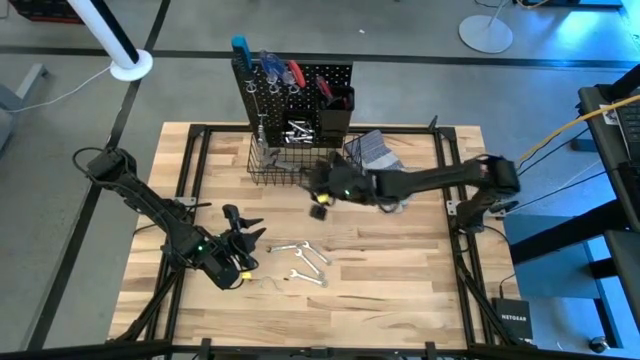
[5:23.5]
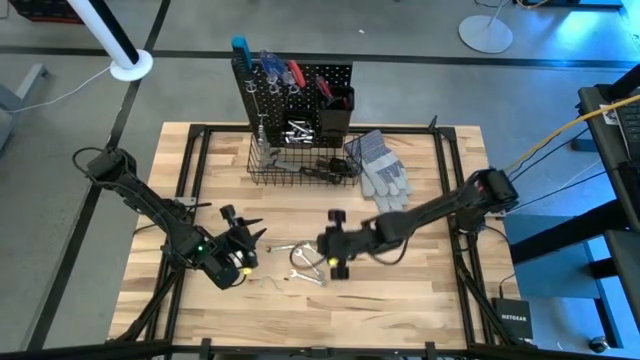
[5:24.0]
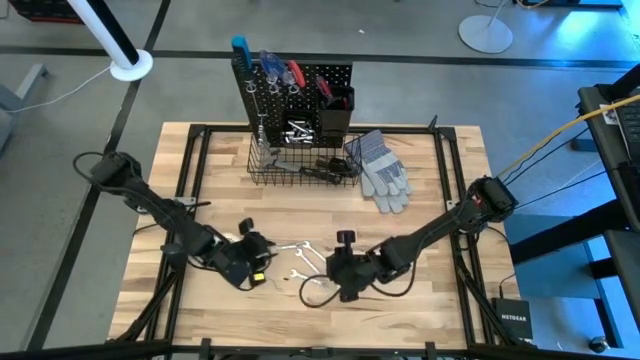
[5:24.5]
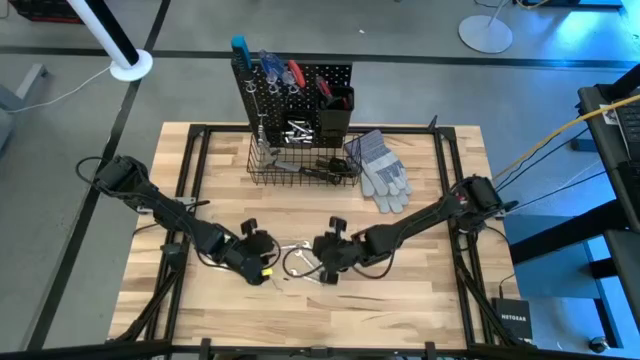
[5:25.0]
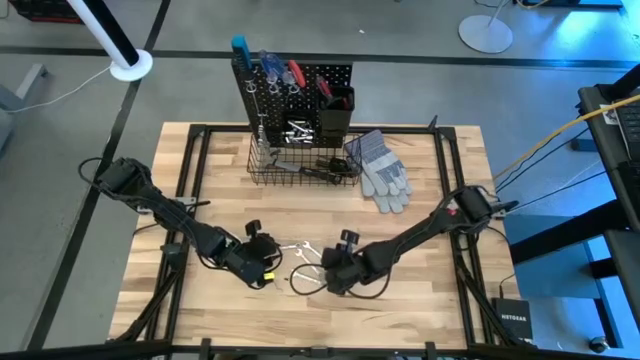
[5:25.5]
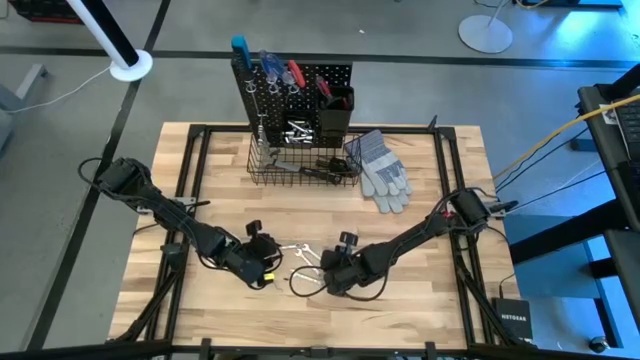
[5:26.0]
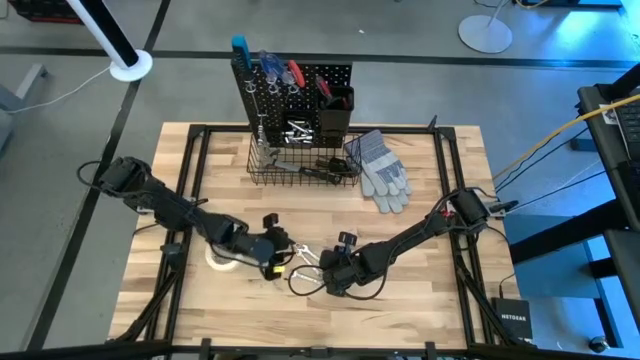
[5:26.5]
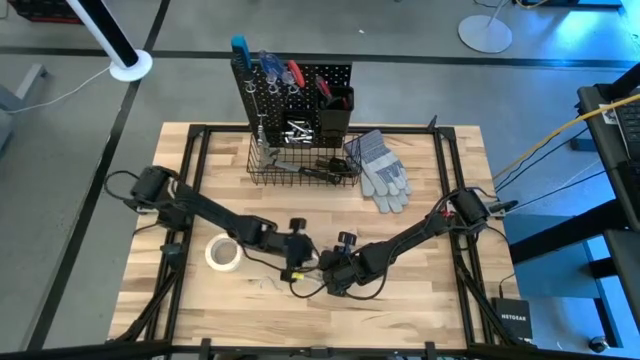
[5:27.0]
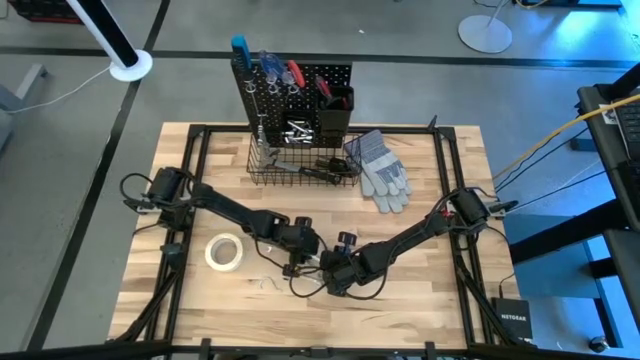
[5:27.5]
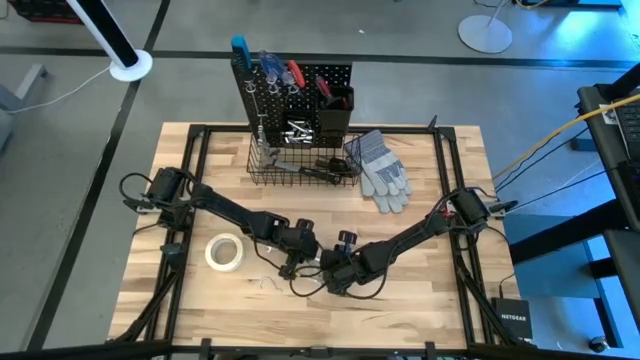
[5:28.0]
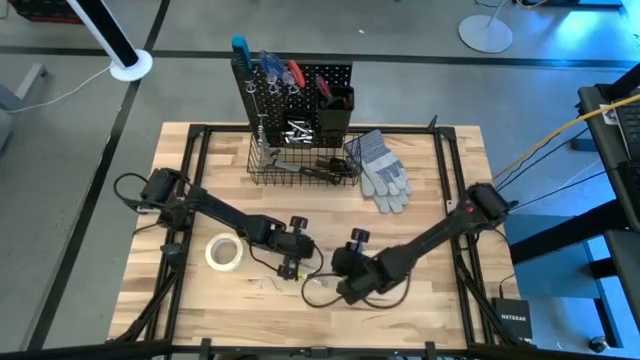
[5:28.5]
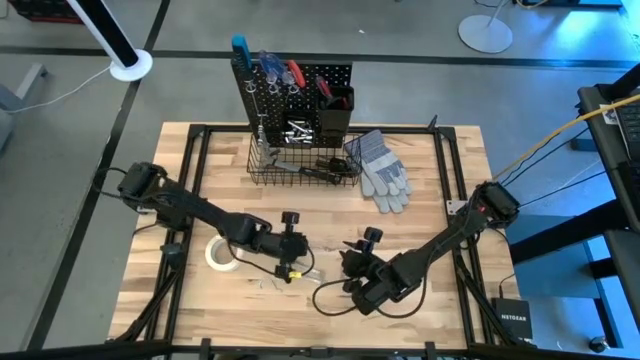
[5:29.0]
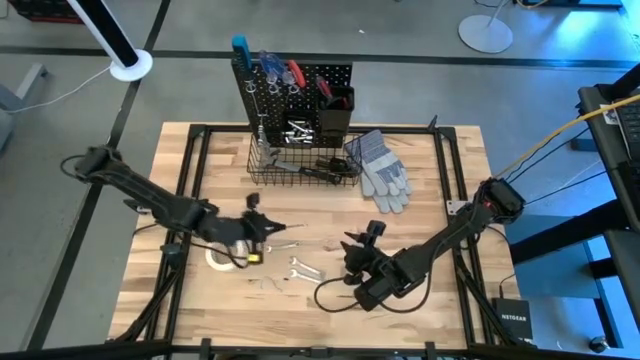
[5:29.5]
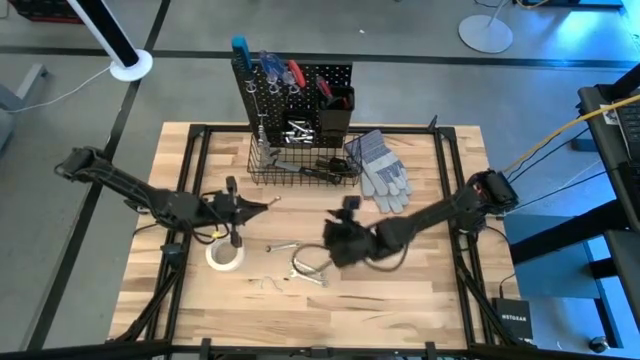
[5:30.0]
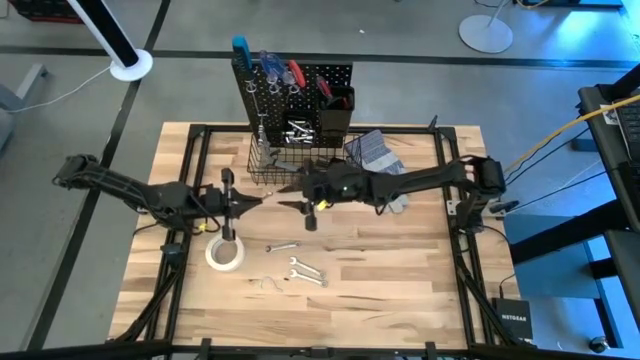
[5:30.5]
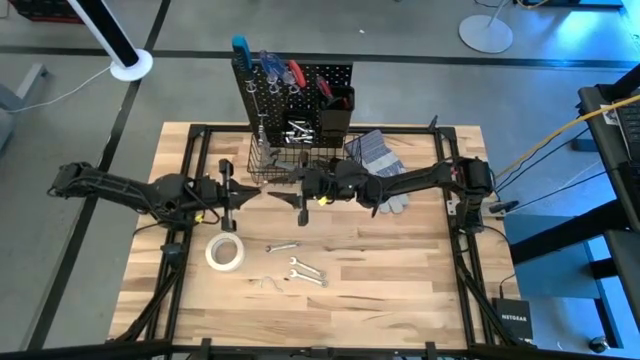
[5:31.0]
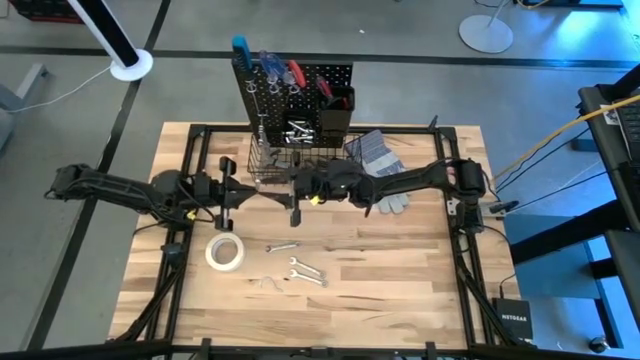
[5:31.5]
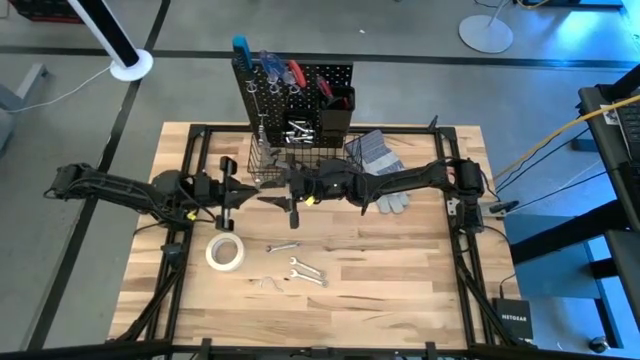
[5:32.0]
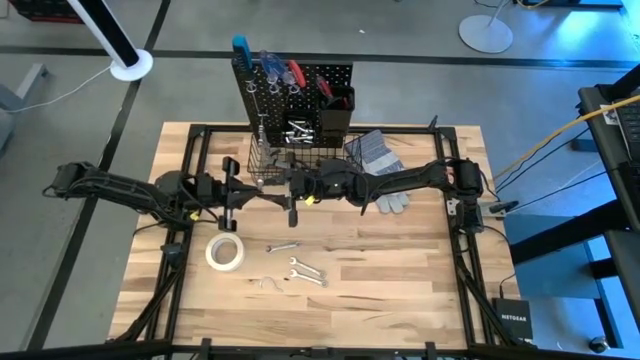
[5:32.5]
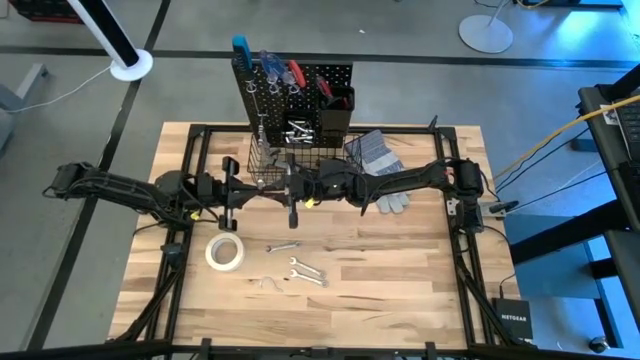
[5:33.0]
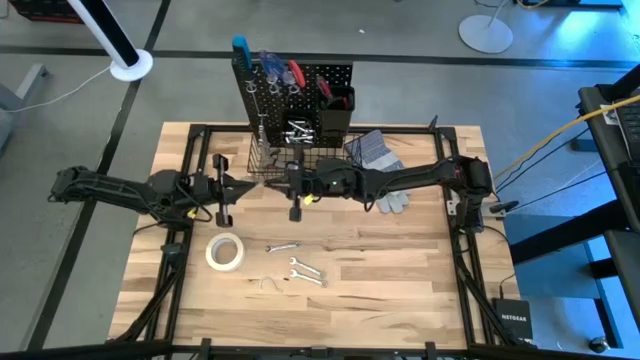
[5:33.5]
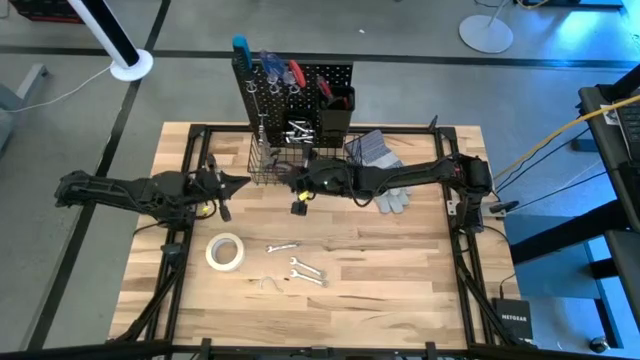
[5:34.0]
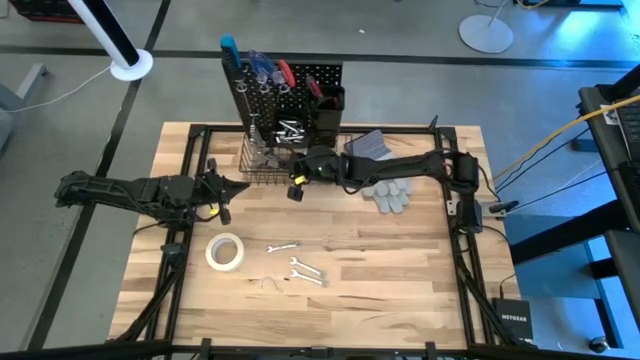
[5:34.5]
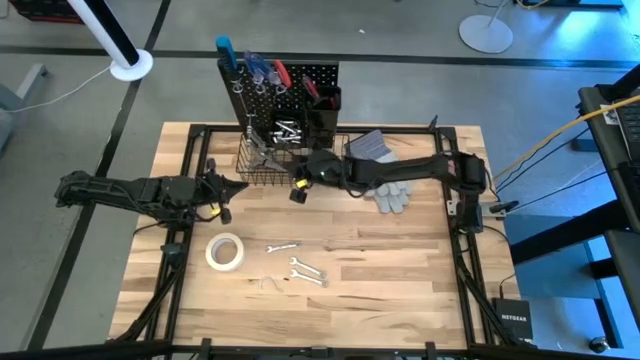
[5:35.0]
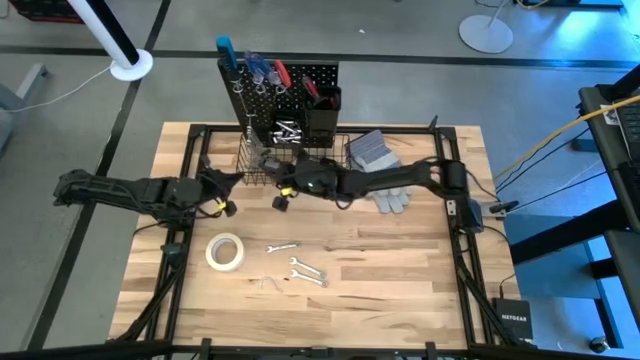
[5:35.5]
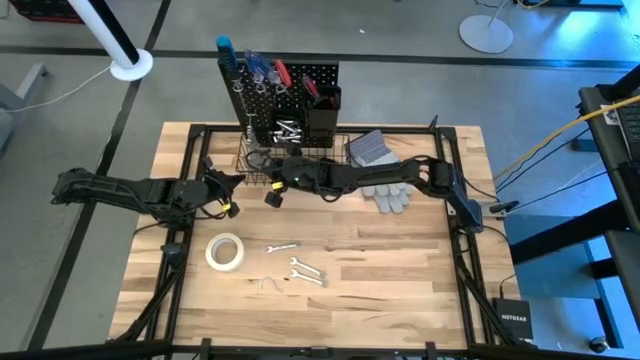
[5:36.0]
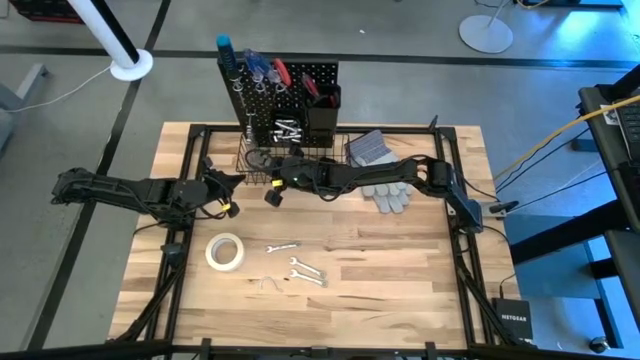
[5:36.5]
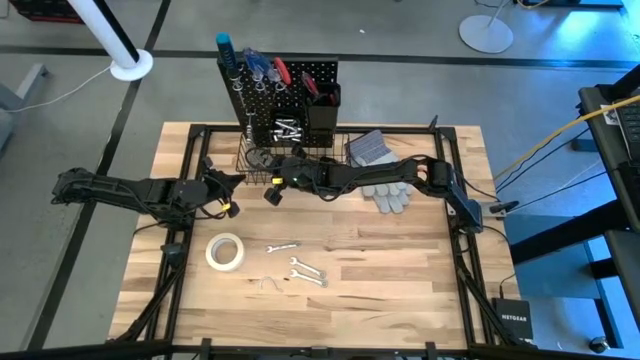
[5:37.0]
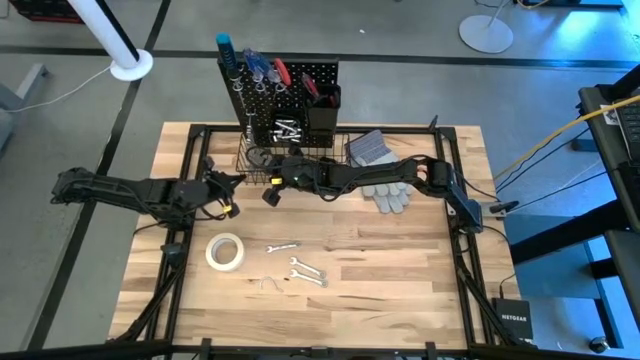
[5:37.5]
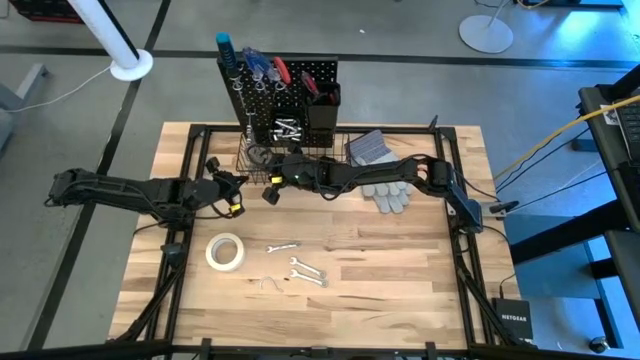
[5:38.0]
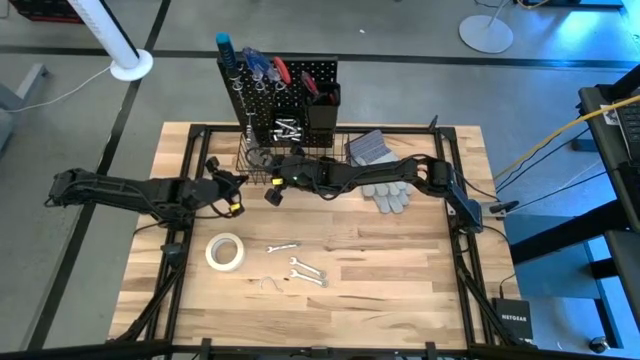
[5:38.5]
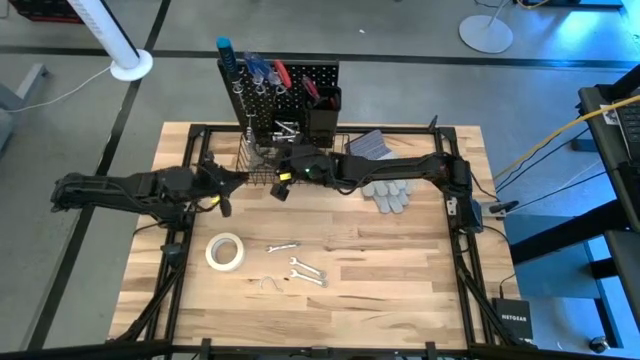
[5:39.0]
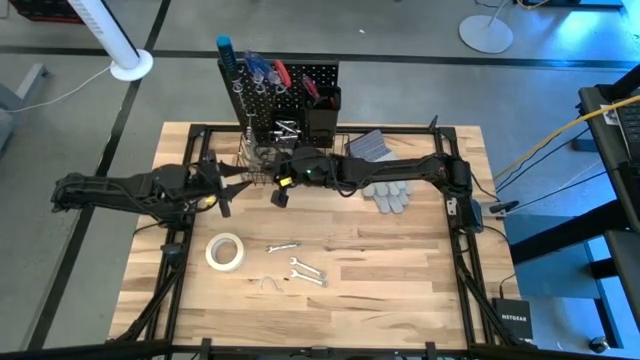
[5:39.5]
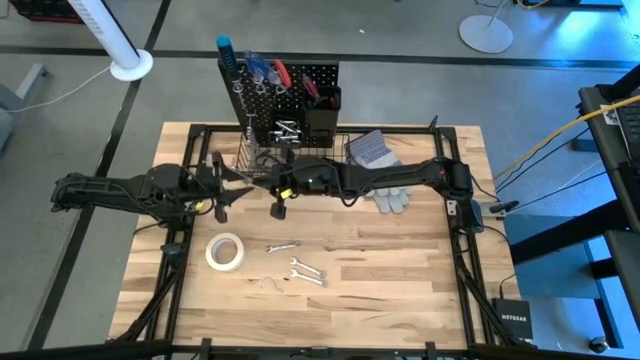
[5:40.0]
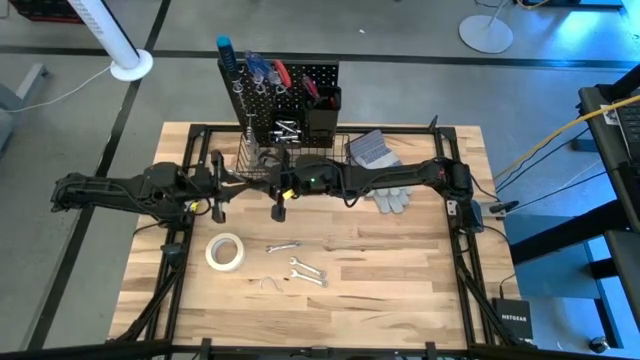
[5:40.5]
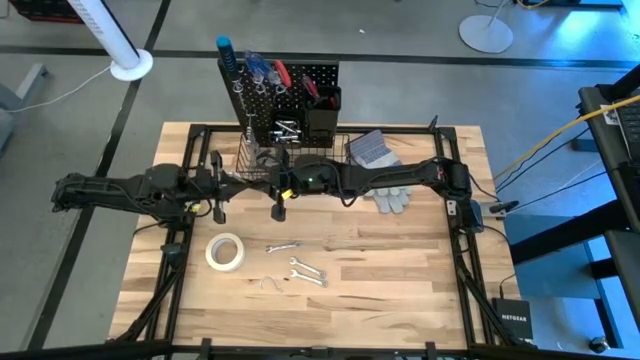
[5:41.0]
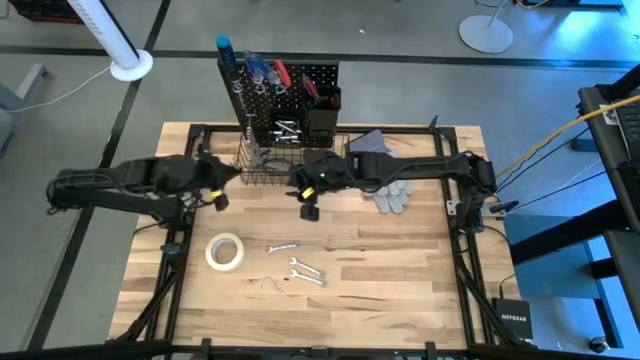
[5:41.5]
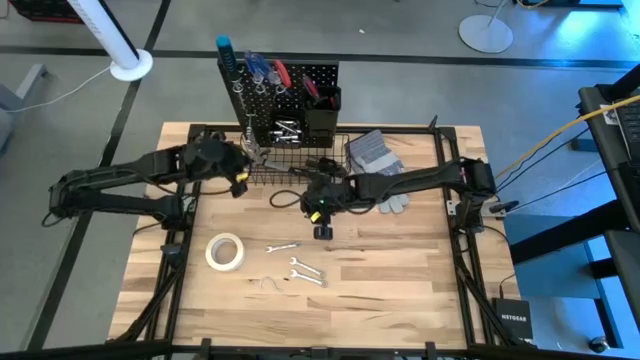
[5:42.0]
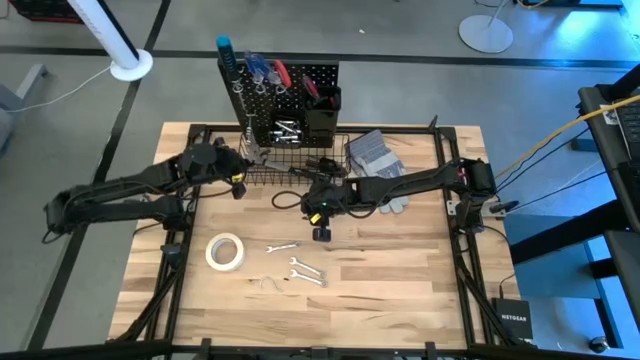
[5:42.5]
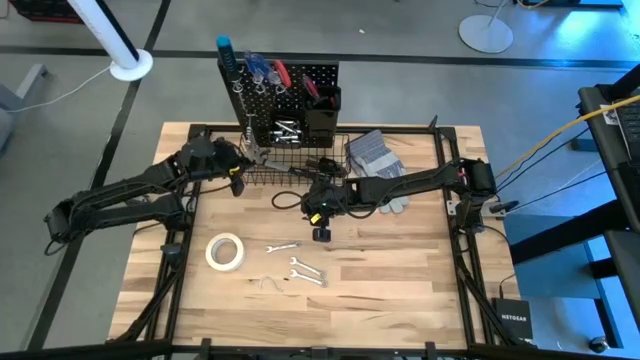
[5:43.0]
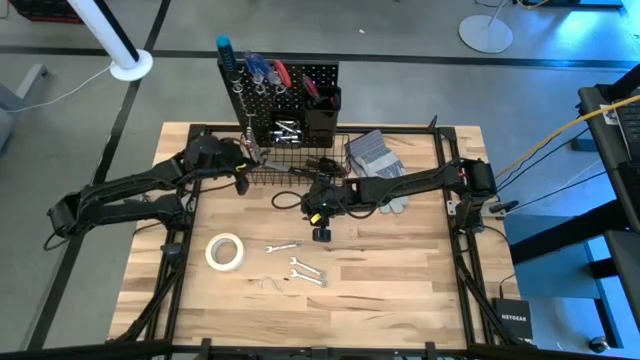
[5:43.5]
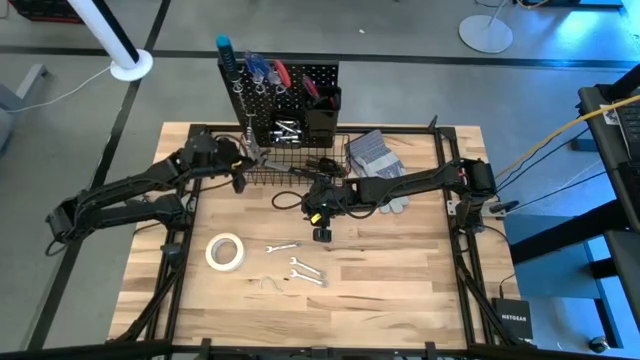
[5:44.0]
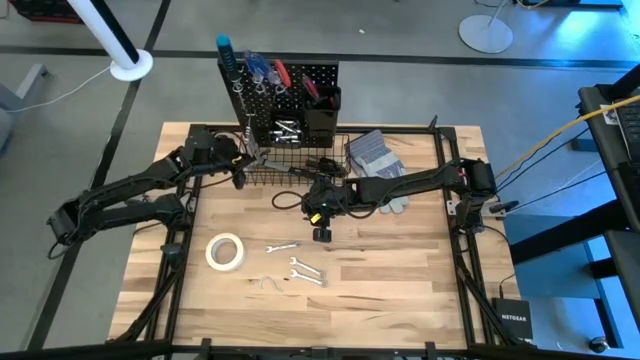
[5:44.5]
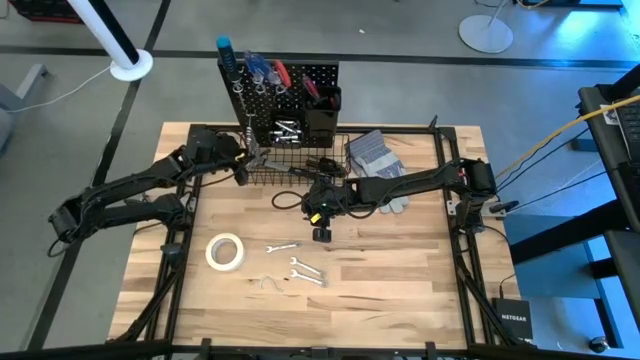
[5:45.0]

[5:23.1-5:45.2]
Task: Hang tools onto peg board
Hang the wrench on the peg board
